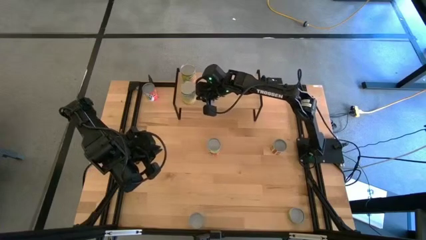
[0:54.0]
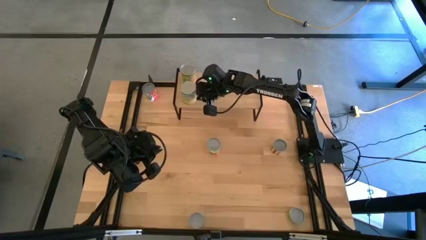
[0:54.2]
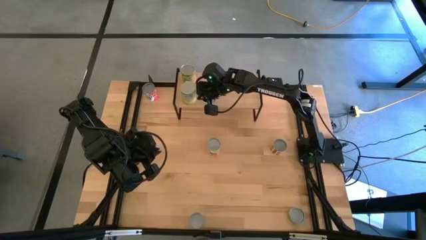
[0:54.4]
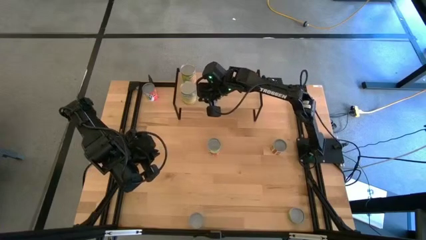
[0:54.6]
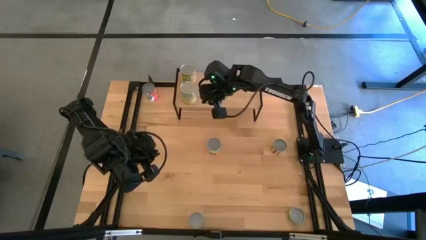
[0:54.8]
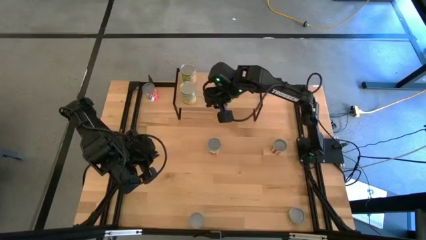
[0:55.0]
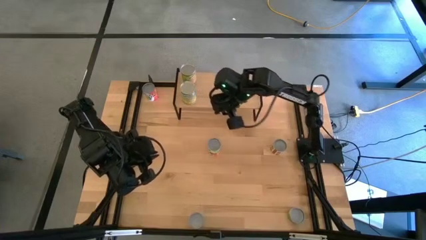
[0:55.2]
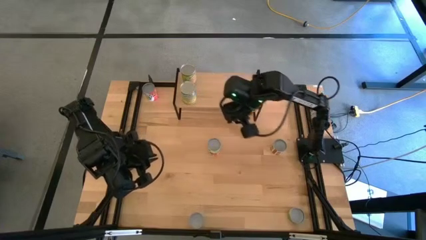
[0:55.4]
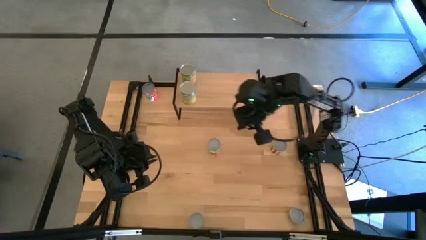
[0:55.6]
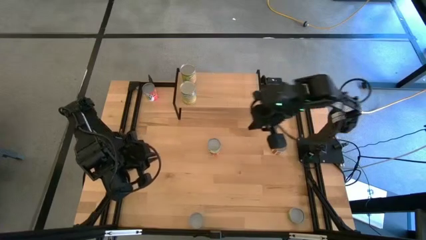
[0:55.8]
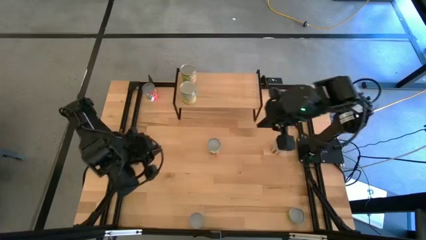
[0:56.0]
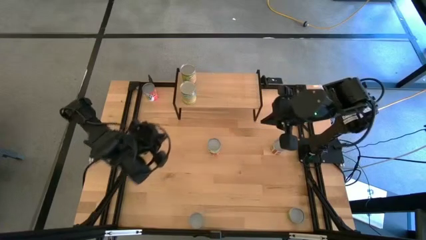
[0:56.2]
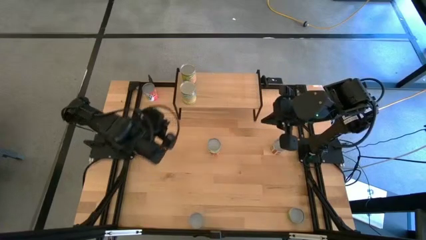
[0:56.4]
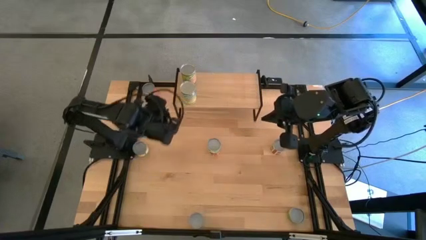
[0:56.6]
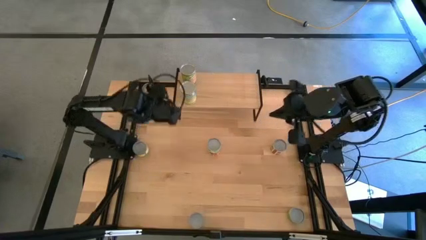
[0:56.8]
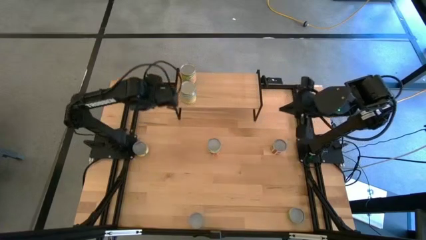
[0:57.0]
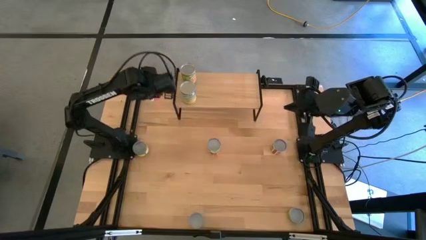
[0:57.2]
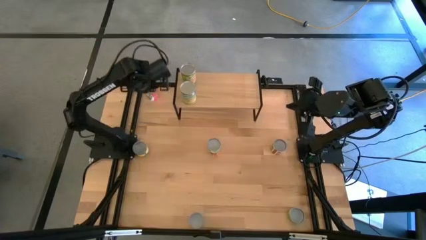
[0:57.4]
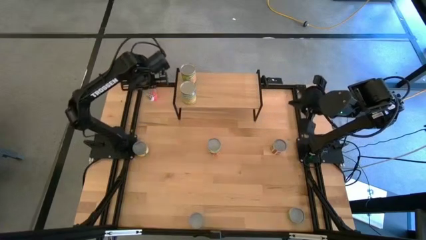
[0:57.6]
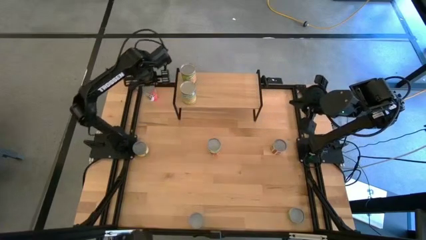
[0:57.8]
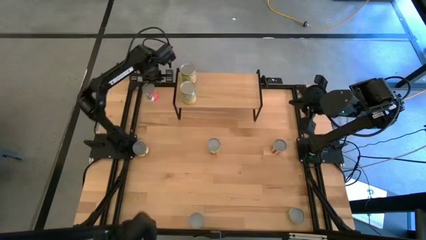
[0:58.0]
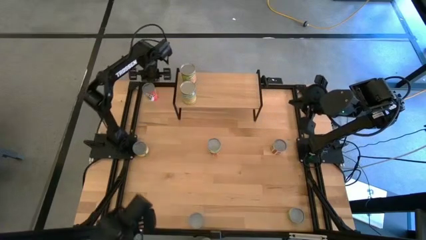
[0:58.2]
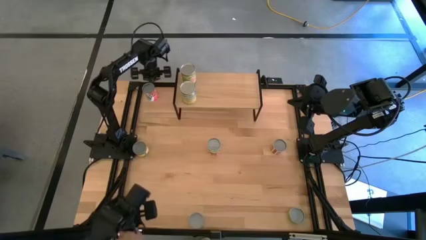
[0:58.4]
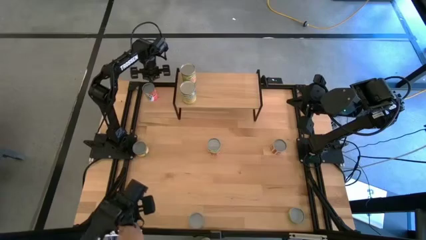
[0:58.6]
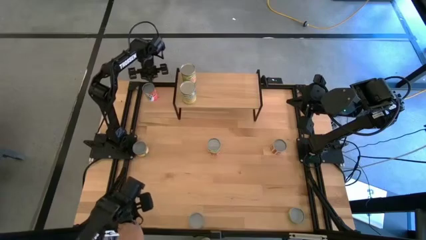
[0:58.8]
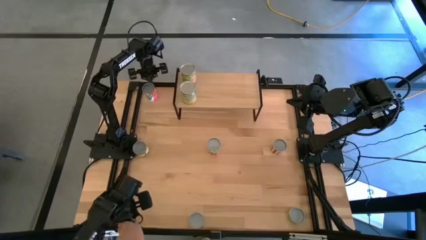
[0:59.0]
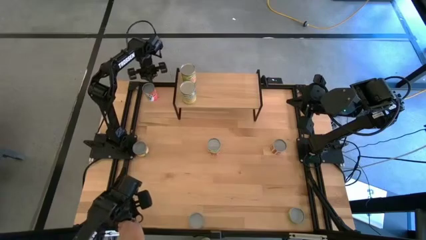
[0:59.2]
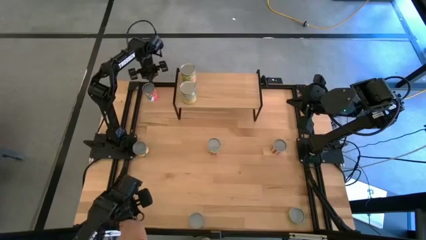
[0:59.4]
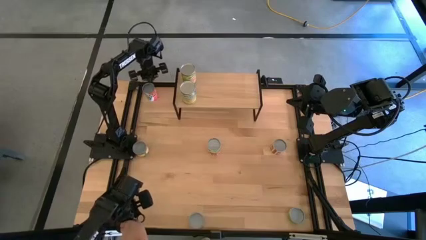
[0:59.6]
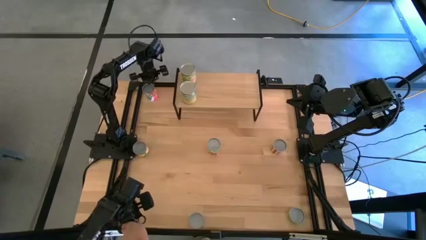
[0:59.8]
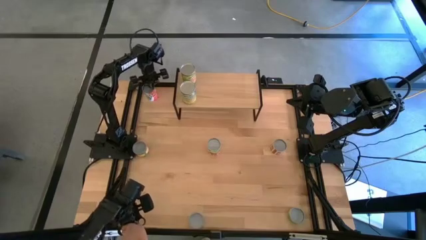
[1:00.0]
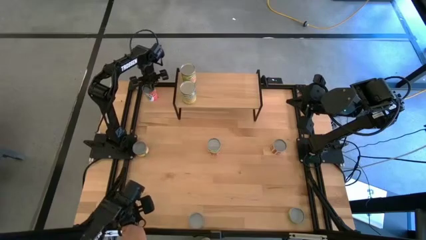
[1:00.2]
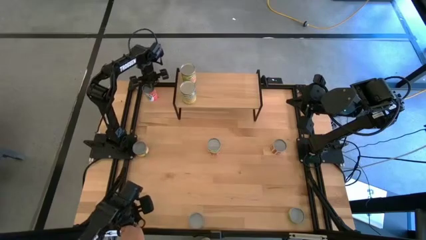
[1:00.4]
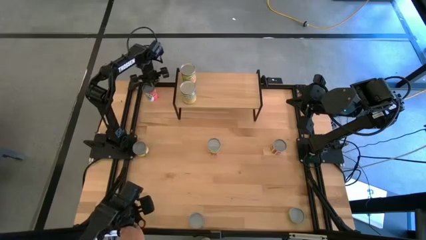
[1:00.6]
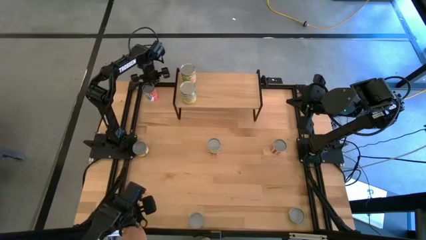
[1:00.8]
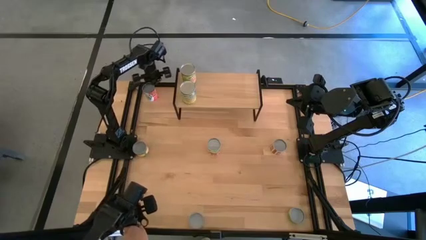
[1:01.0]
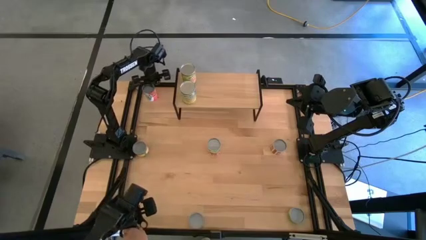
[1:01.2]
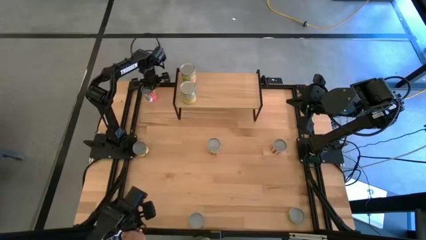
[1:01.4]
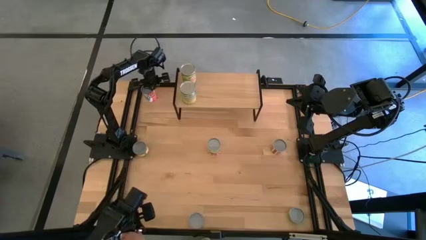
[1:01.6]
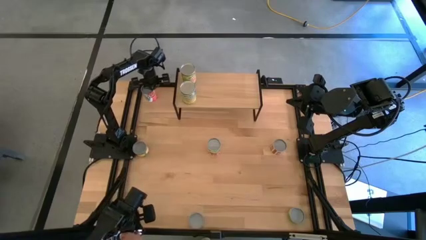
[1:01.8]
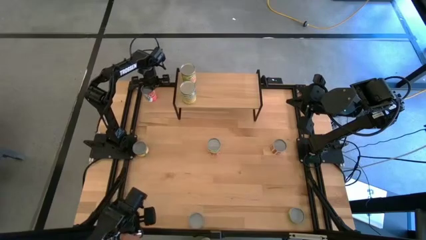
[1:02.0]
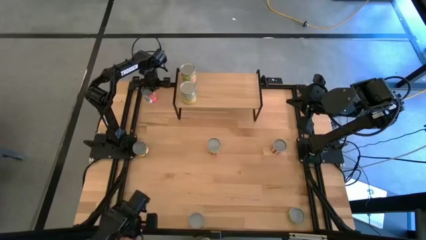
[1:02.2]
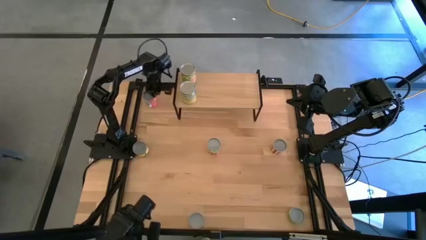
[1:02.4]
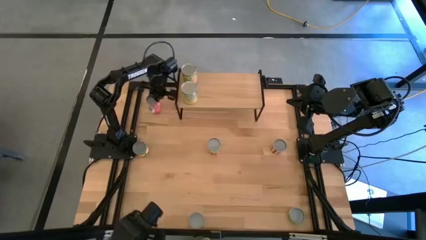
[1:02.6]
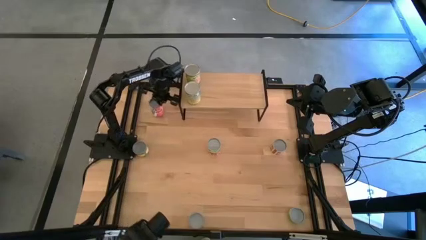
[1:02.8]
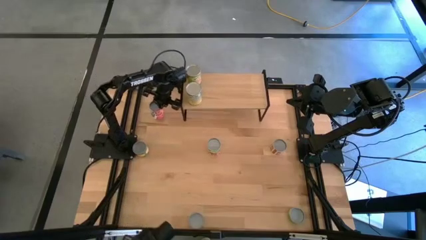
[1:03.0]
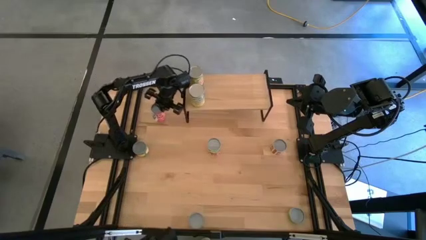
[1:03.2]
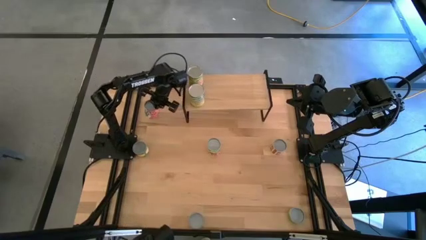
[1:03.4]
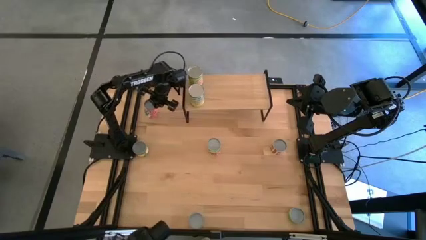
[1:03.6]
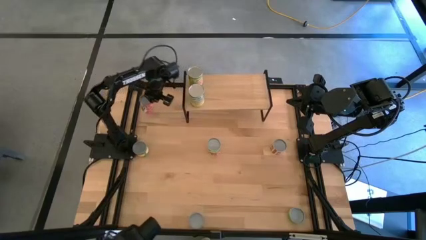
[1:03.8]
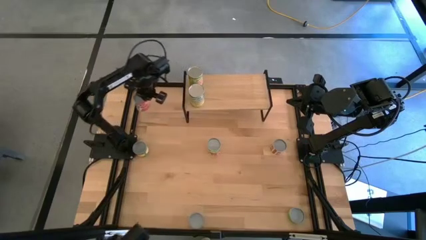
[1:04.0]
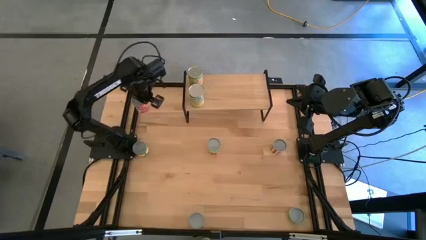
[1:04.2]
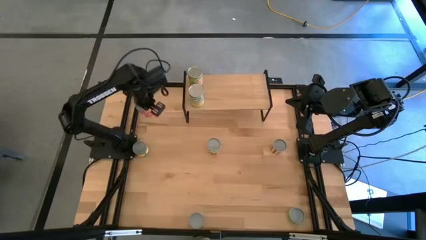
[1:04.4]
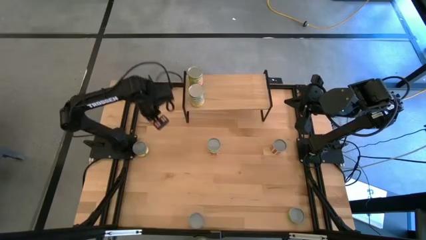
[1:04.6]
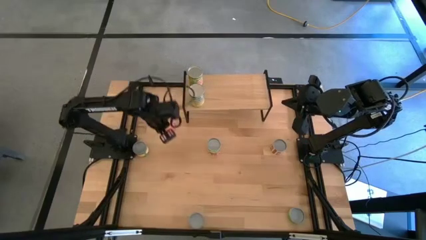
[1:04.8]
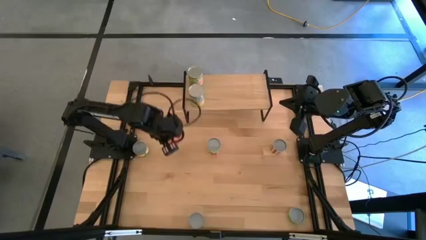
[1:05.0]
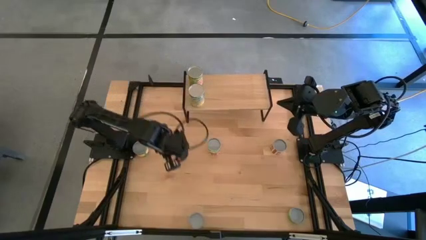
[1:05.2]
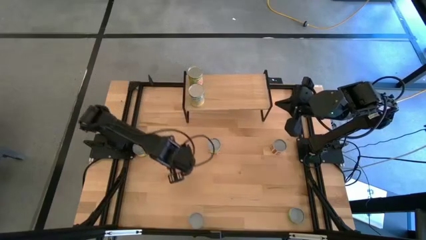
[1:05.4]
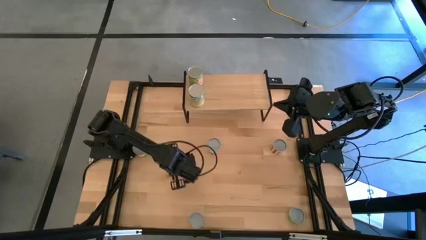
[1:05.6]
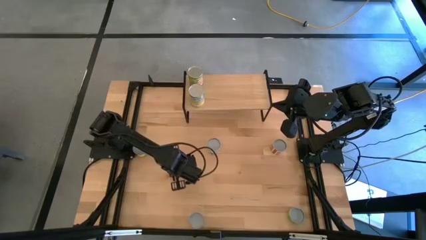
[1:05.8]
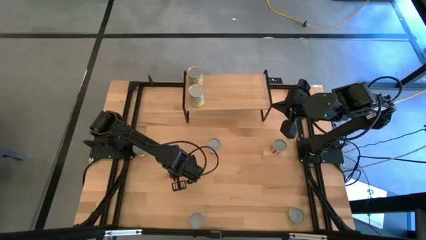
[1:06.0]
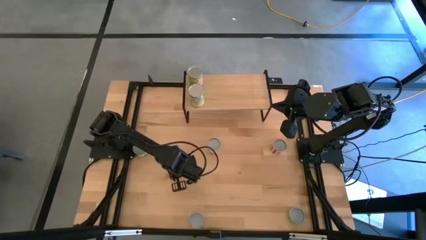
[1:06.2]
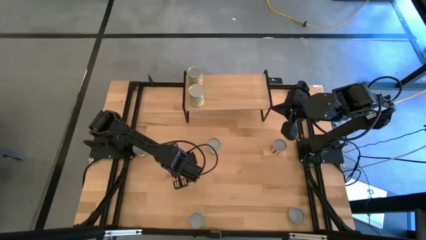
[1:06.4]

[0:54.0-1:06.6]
Task: Pick and place cans onto a shelf
Move the canned mixed fruits to the center of the table

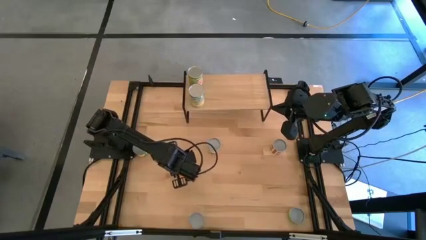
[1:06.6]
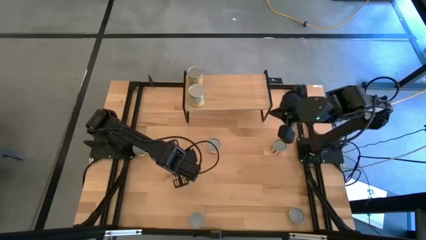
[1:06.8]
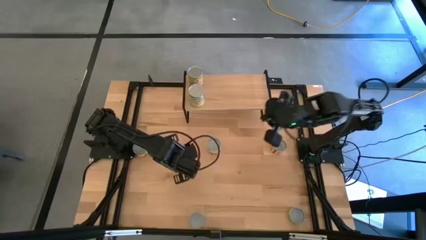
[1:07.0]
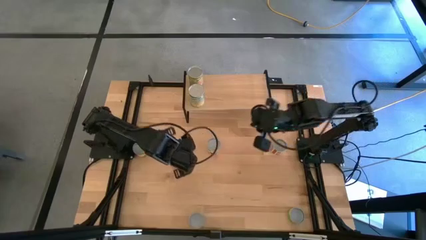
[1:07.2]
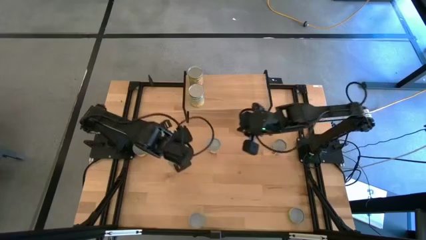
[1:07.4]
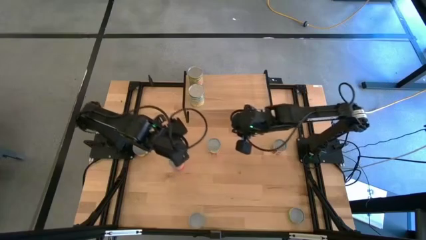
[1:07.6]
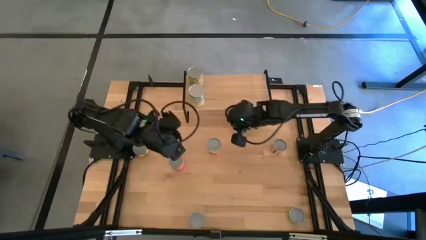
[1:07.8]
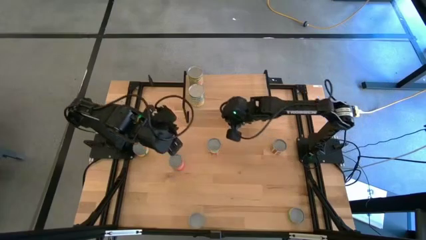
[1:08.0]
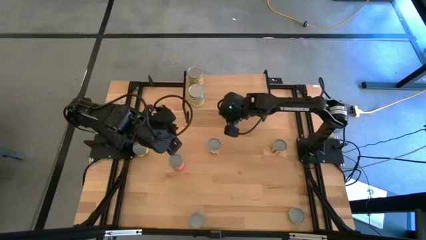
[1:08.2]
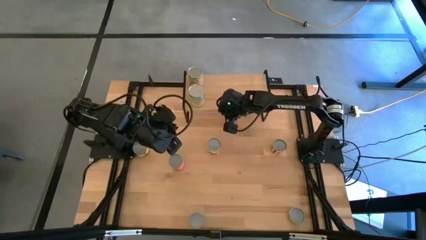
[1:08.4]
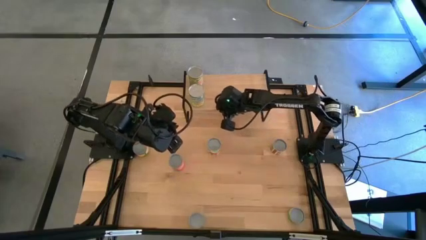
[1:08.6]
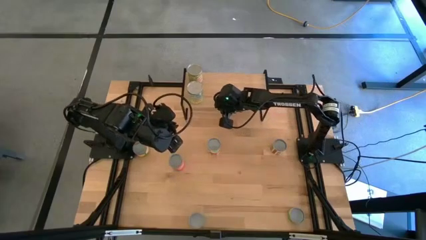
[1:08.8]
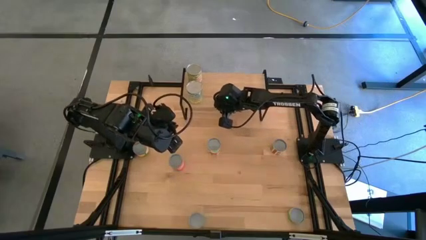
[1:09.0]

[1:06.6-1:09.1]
Adjust the shelf on the table
